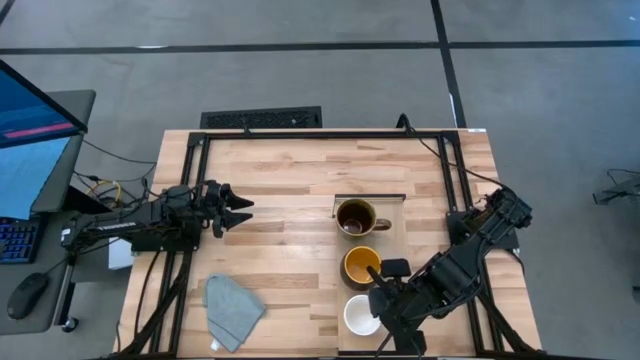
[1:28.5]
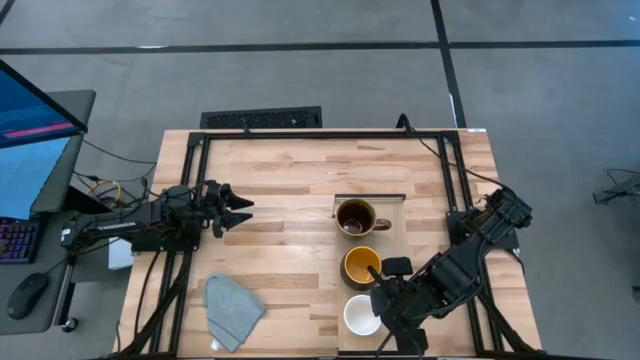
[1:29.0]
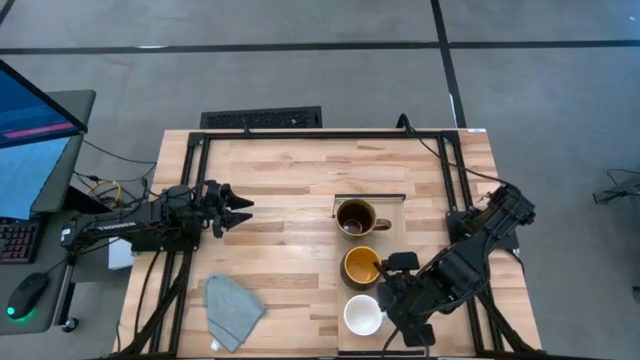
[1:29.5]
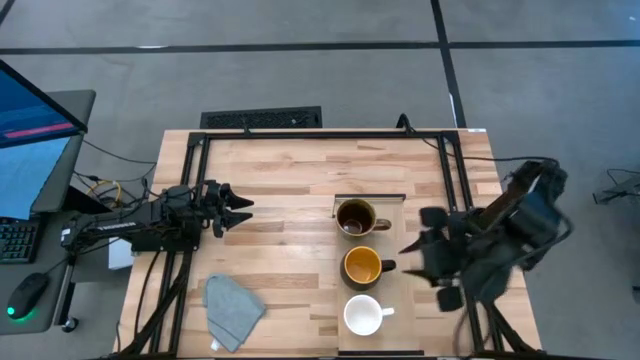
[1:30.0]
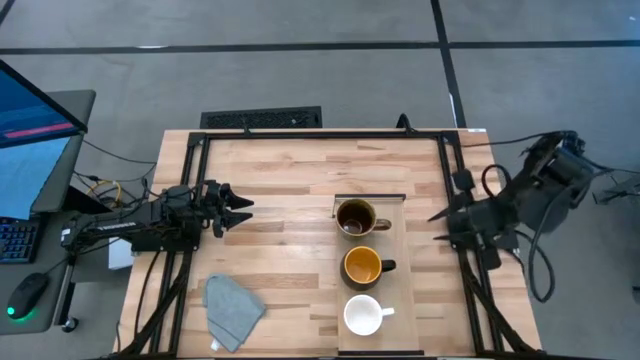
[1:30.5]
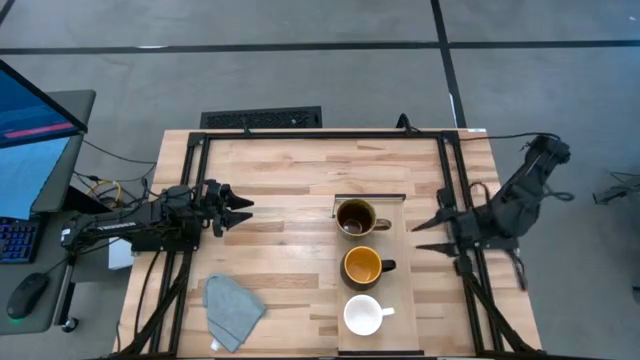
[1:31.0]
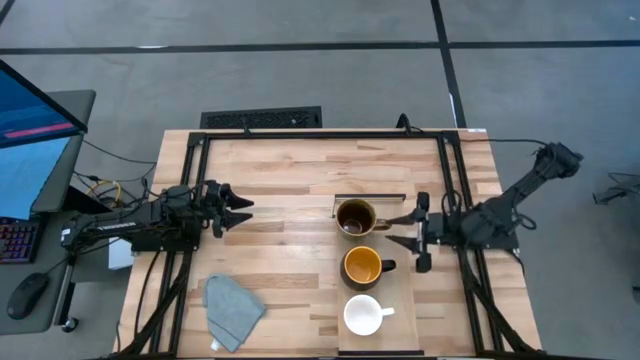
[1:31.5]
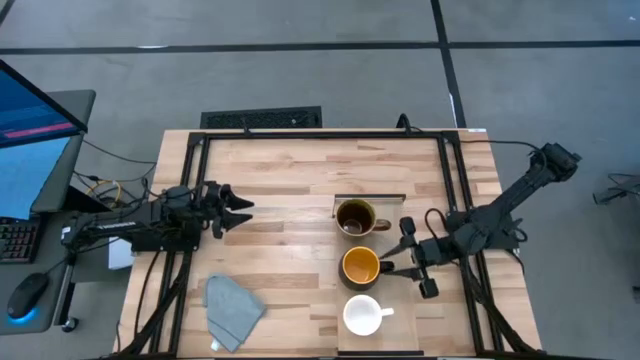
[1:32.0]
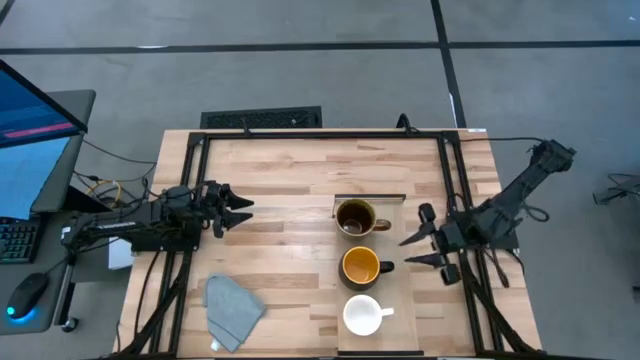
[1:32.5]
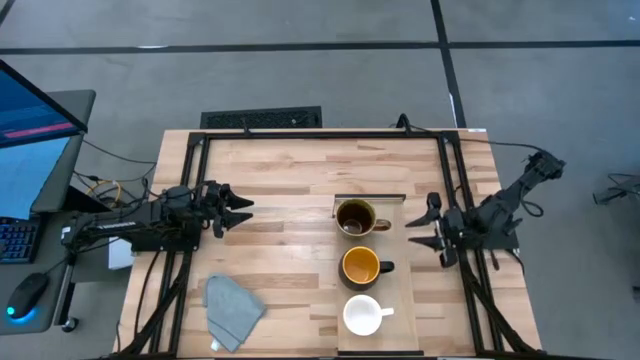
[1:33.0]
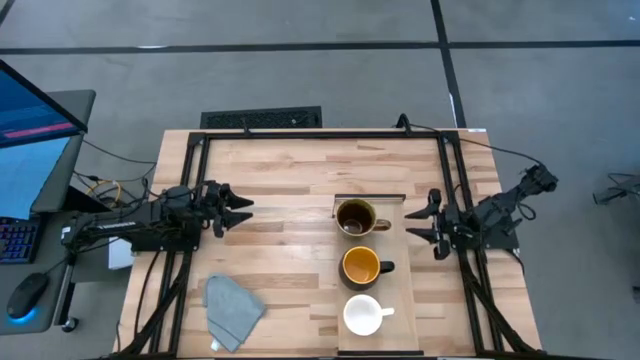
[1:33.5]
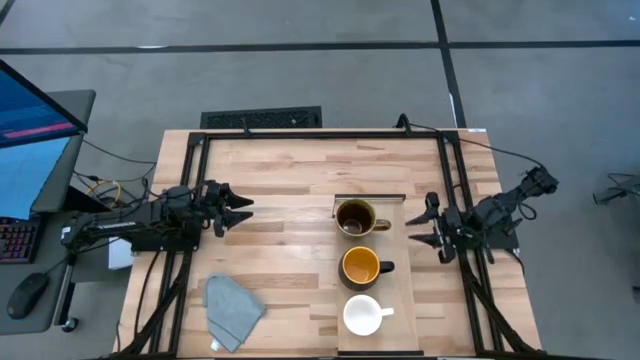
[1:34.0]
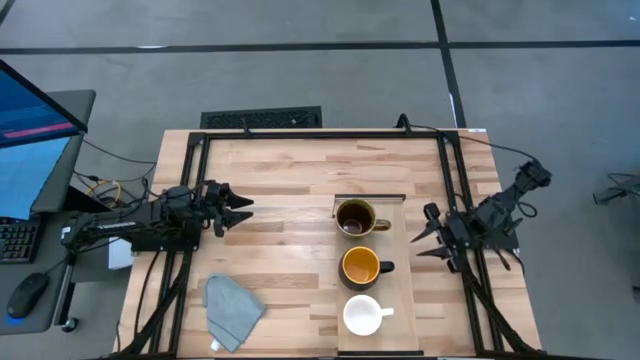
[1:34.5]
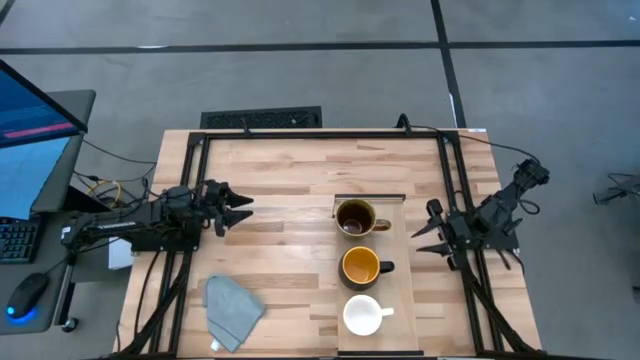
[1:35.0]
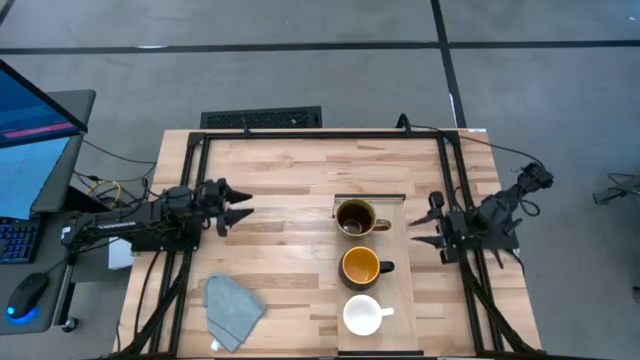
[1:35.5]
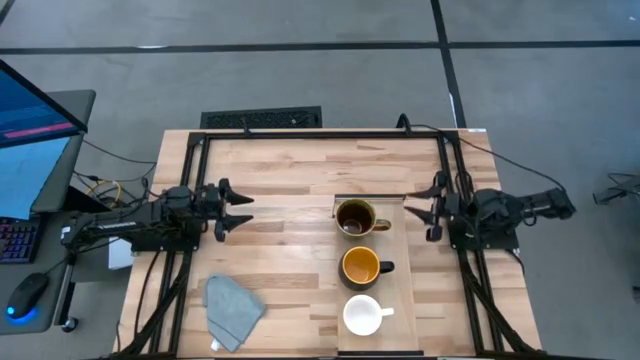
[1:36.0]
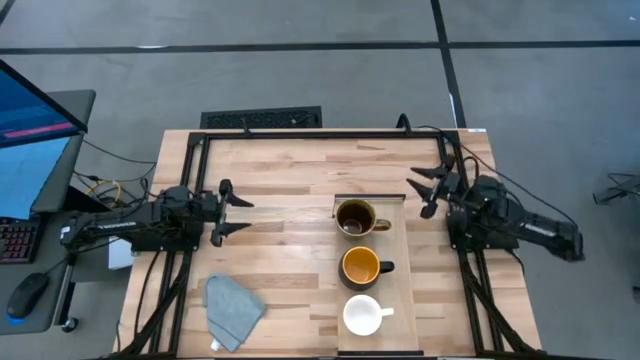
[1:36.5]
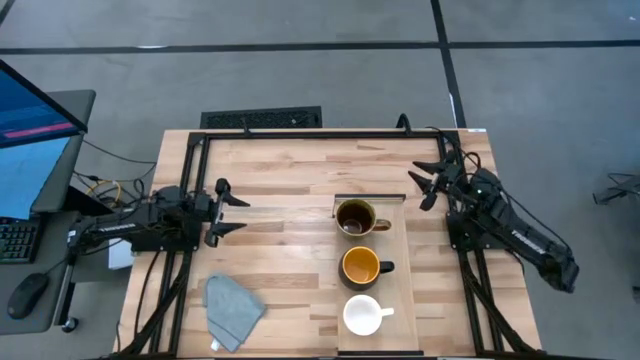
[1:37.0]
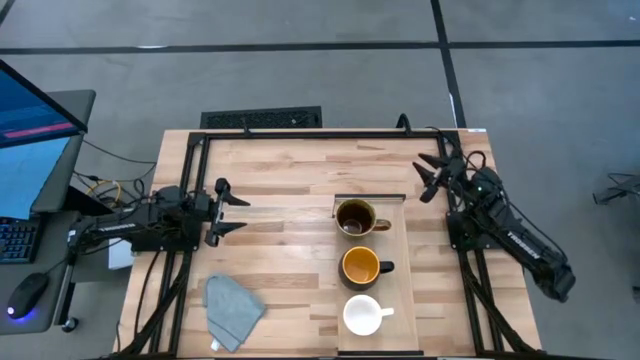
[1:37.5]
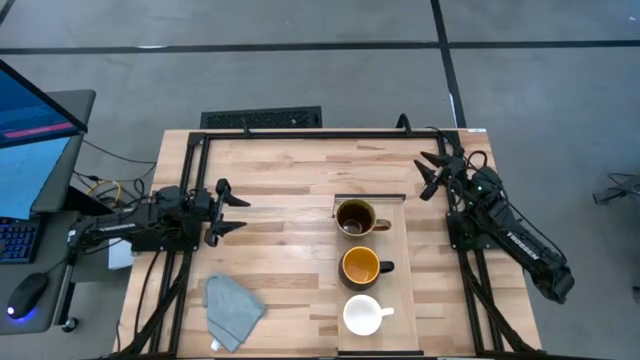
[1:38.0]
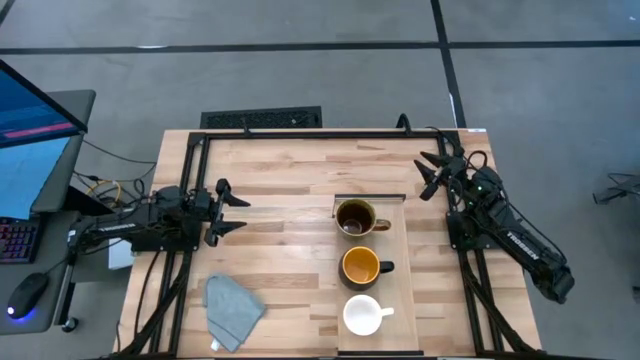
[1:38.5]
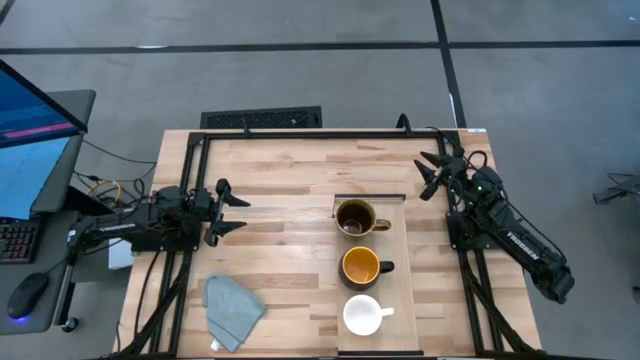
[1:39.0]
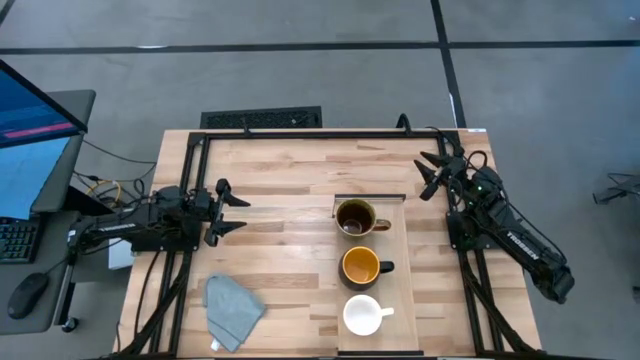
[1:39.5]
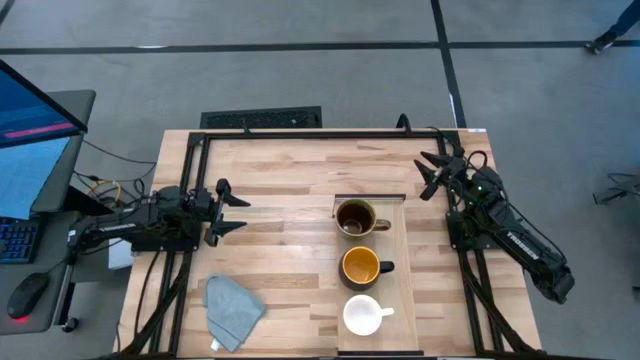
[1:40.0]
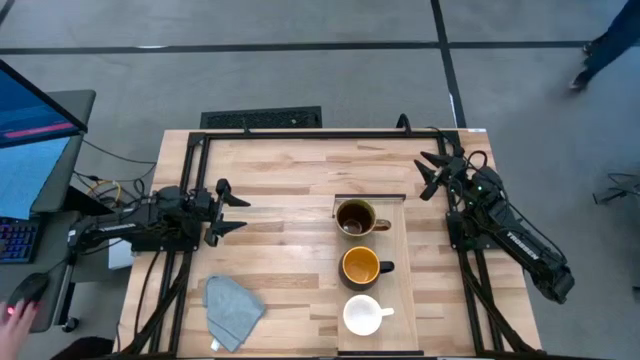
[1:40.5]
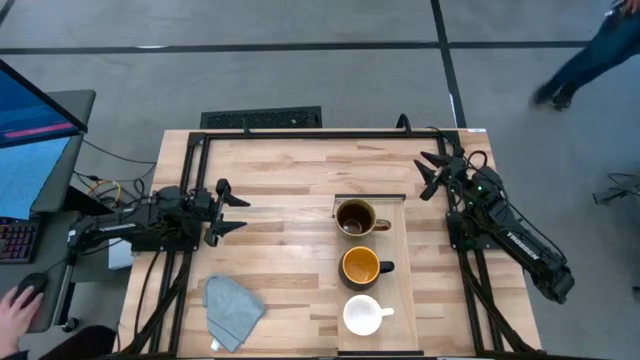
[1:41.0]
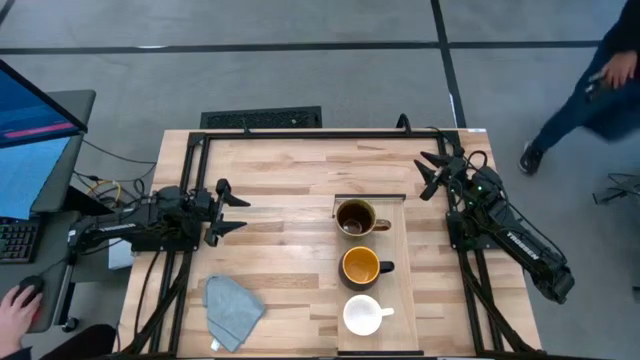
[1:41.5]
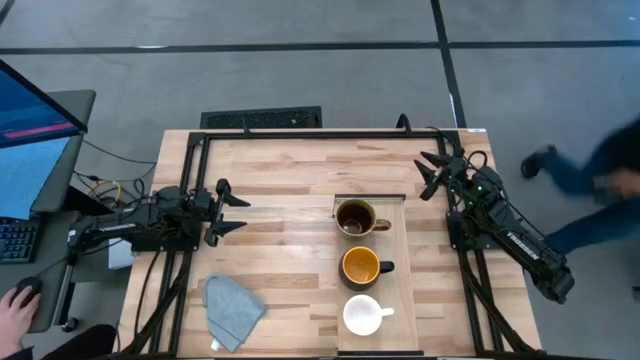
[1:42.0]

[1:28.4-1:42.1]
Task: Stack small to large cups/mugs on shelf
Return to Home Position

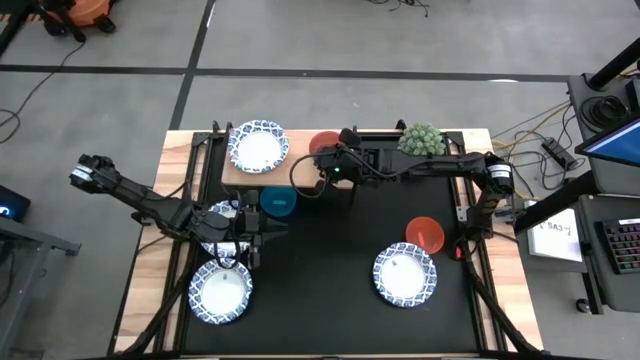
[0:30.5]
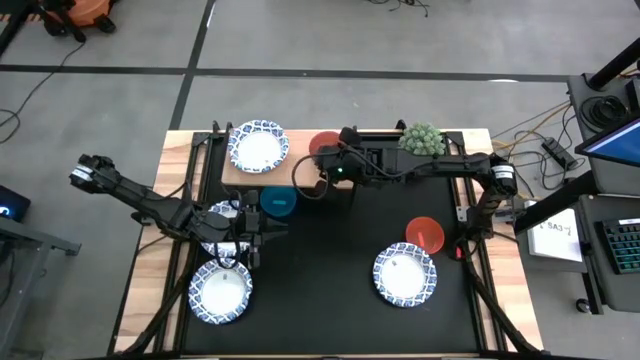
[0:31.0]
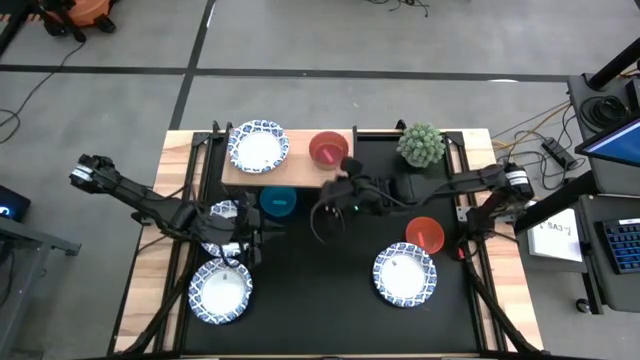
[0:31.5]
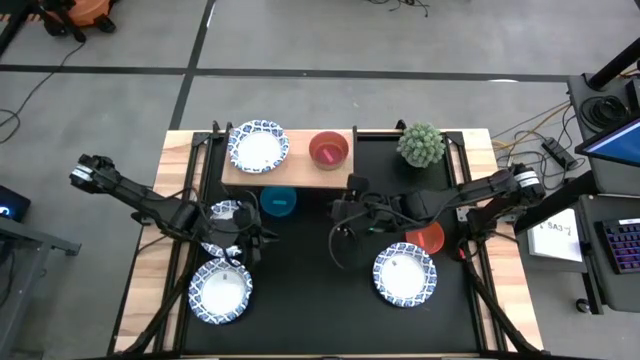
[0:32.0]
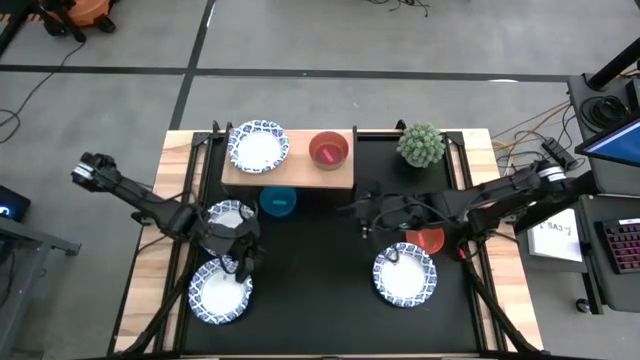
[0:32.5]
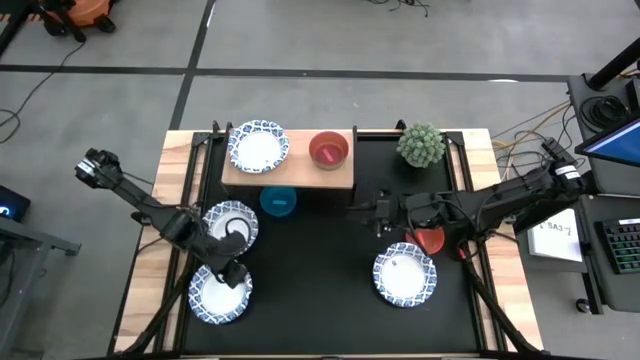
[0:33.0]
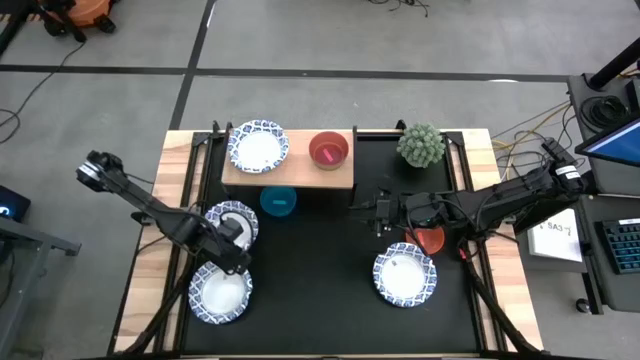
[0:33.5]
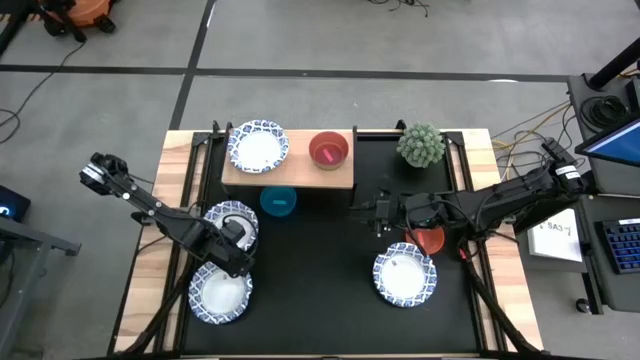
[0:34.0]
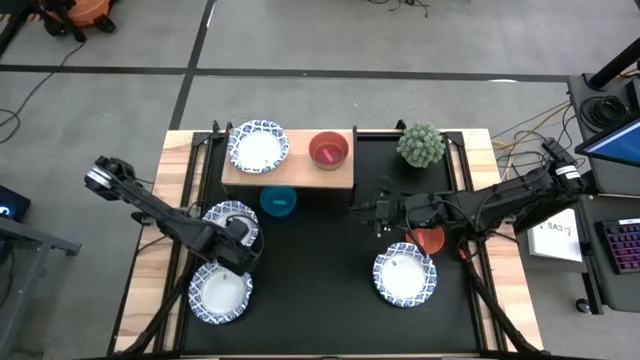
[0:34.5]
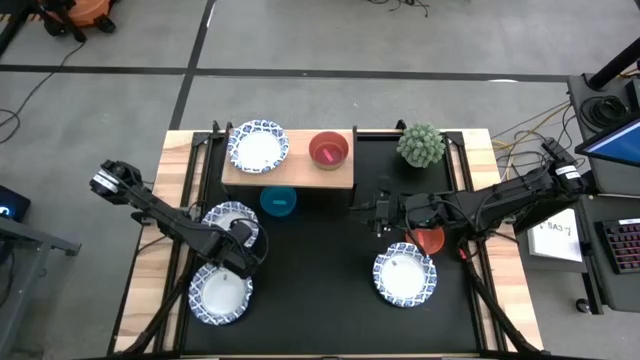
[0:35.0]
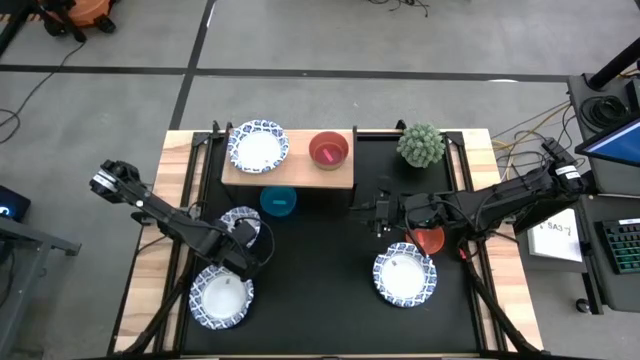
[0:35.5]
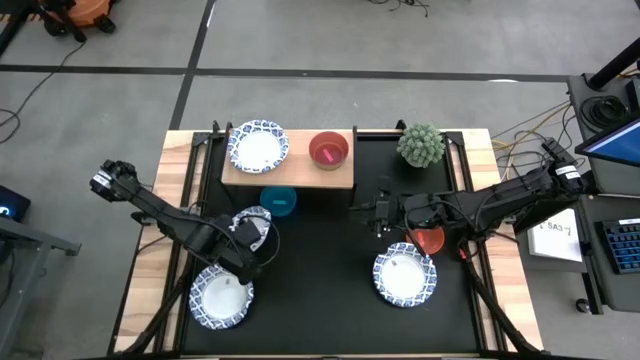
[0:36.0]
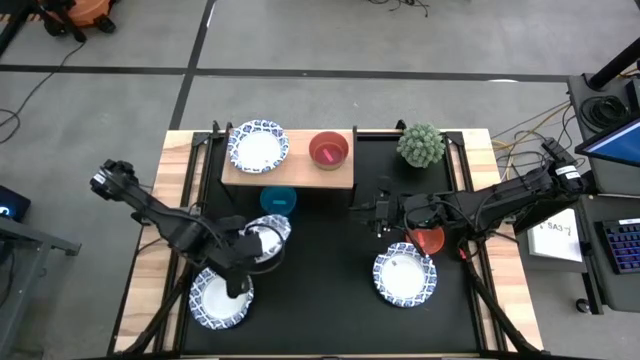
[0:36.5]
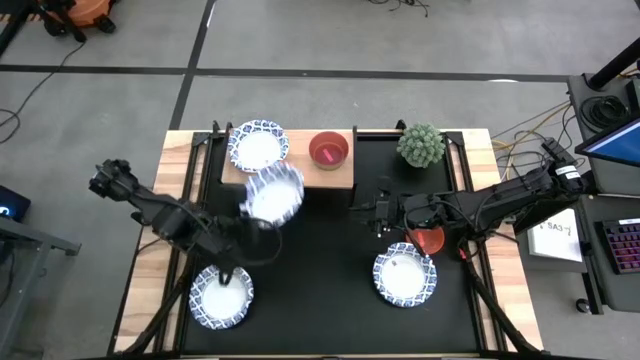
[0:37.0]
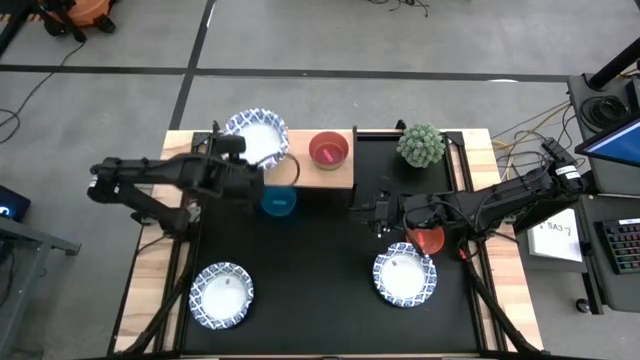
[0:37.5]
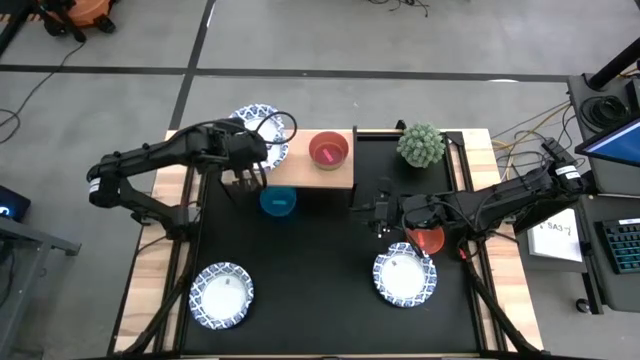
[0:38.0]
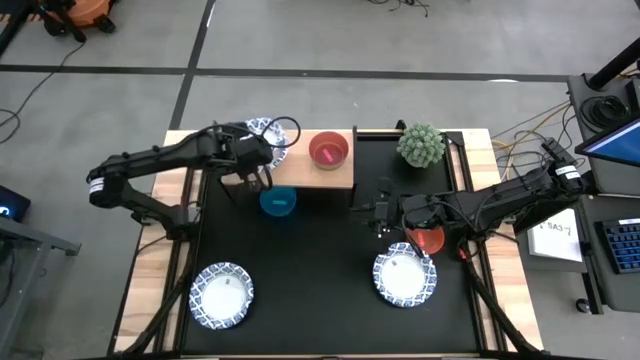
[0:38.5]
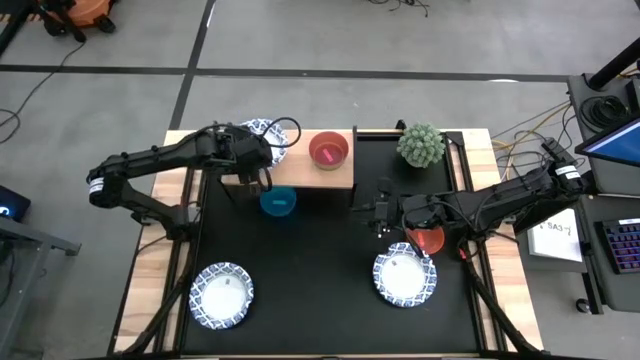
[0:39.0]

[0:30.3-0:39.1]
Task: Place and stack bowls onto a shelf
Stack the white bowl on top of the other white bowl on the shelf
